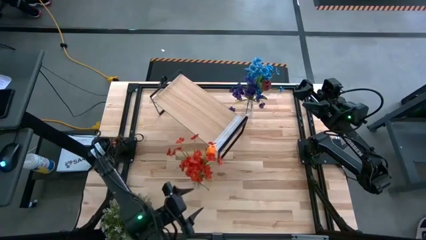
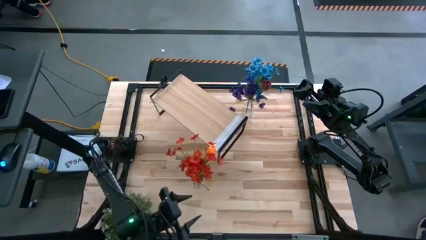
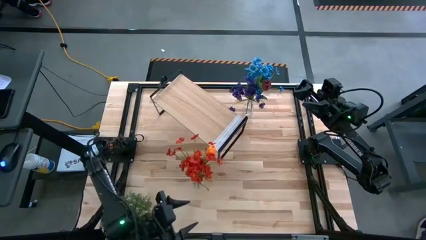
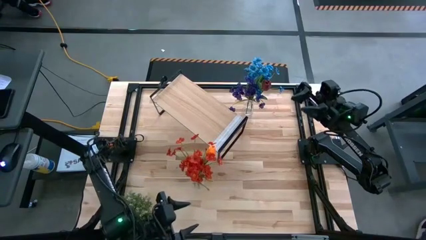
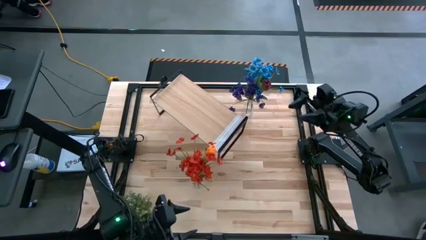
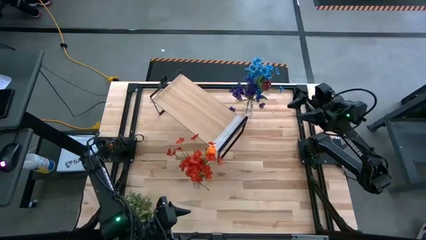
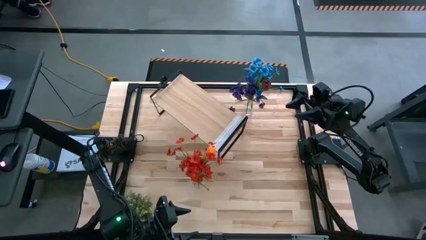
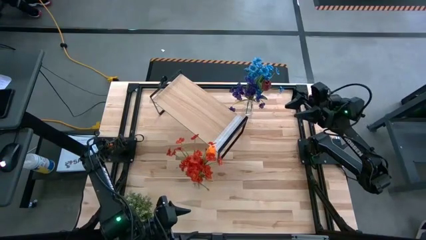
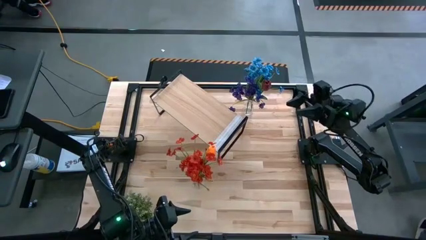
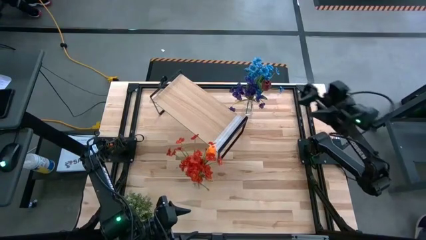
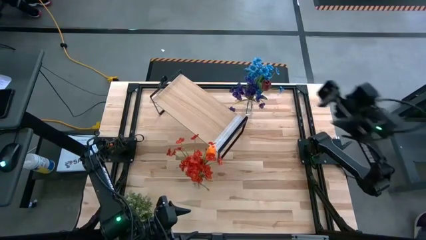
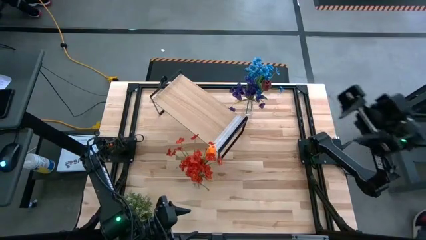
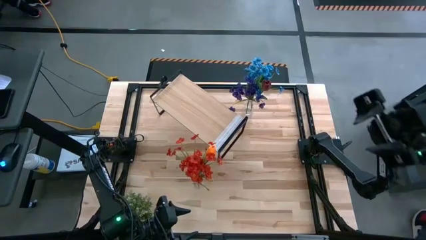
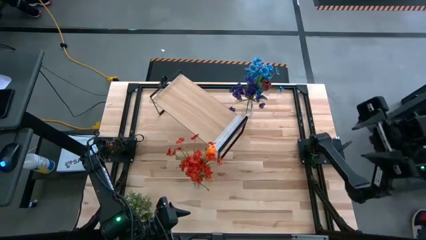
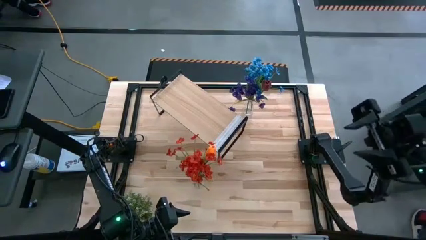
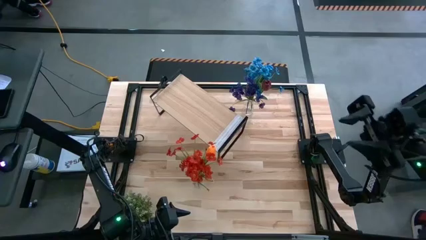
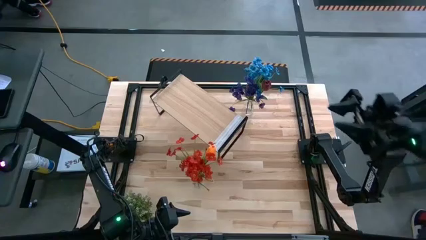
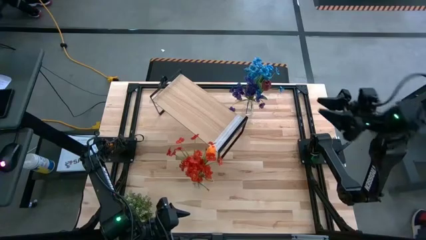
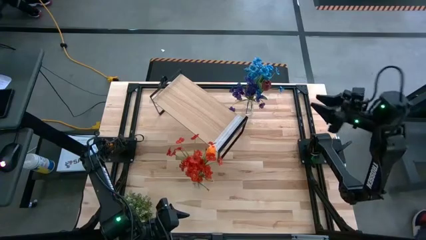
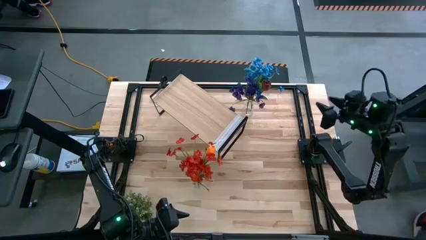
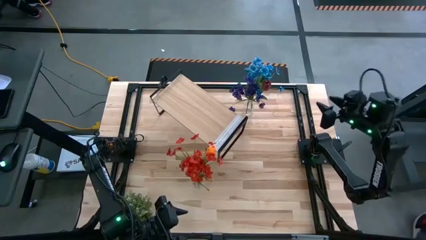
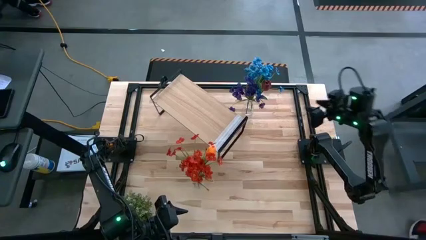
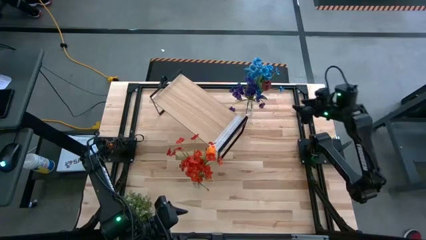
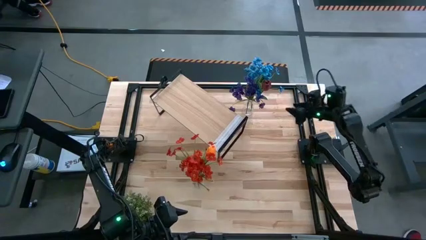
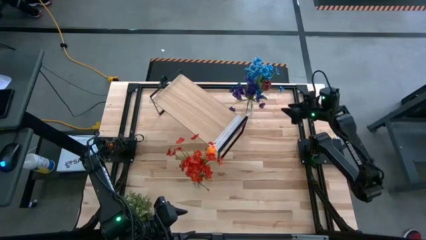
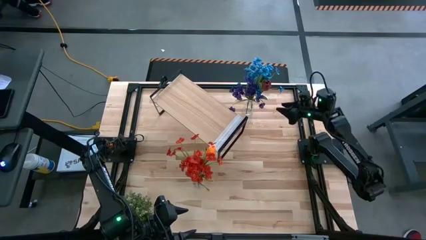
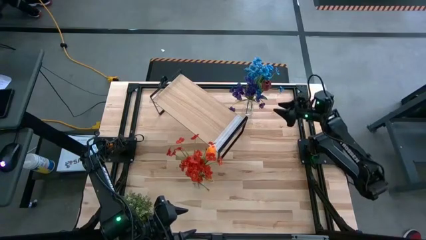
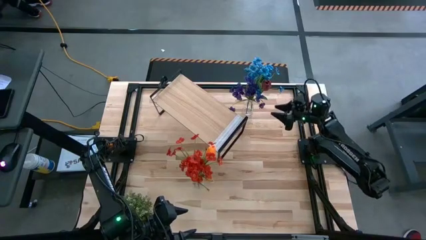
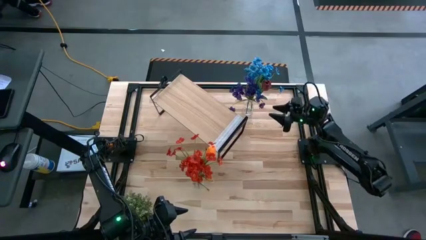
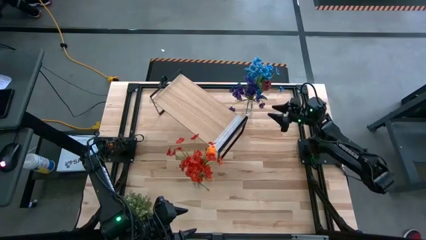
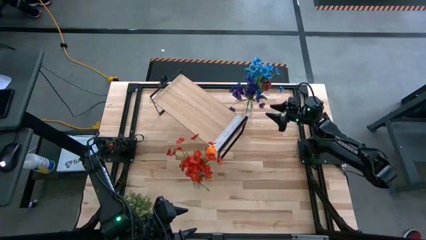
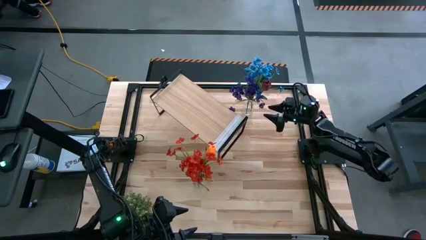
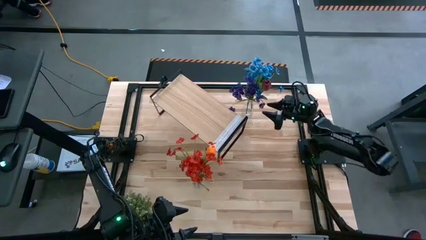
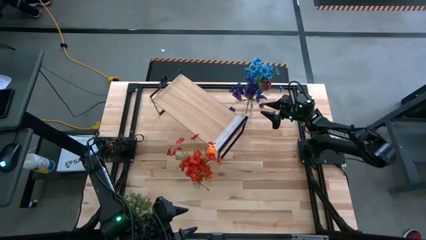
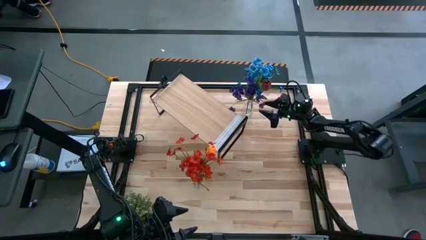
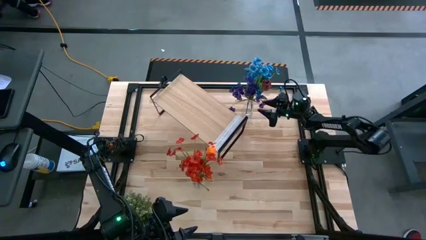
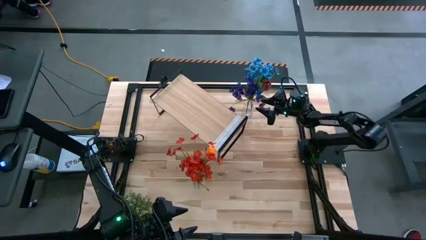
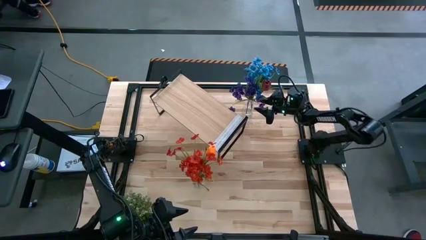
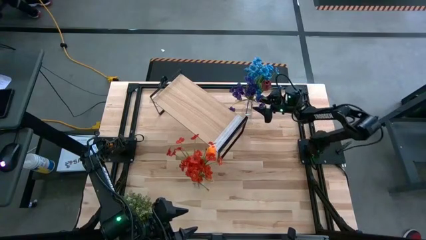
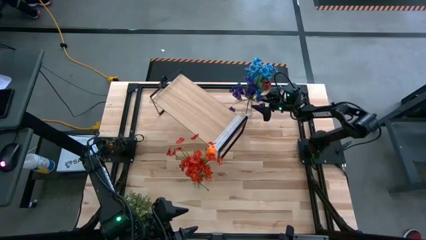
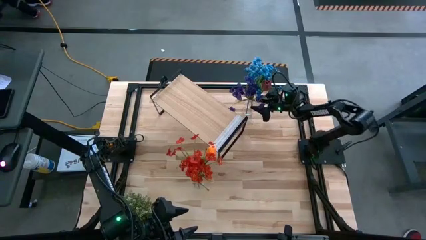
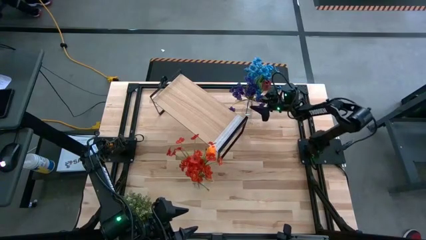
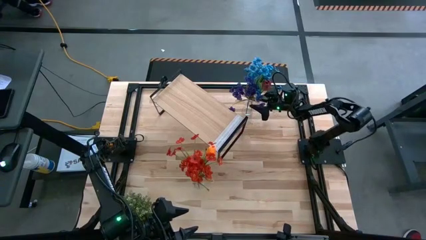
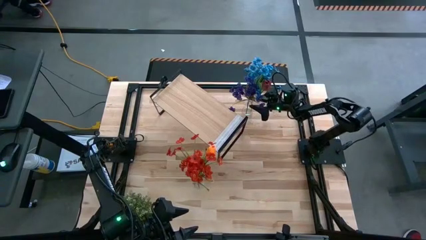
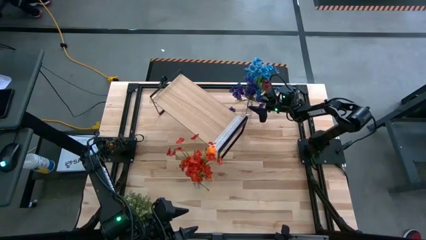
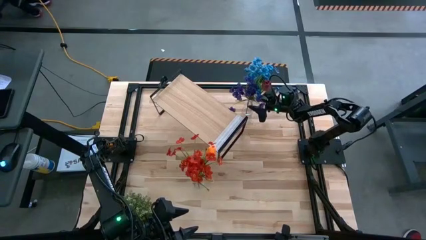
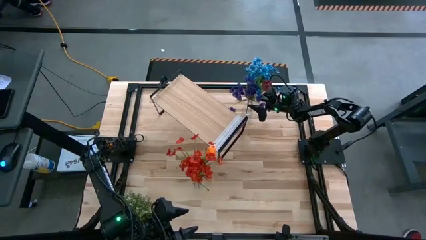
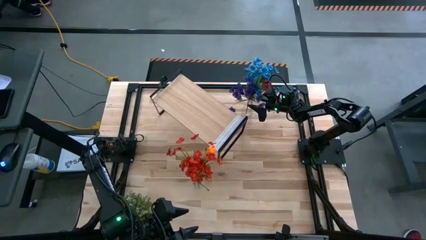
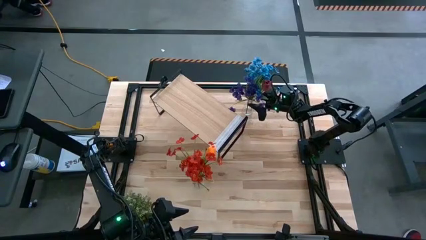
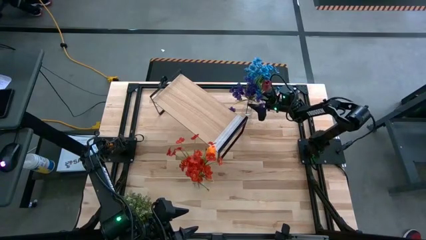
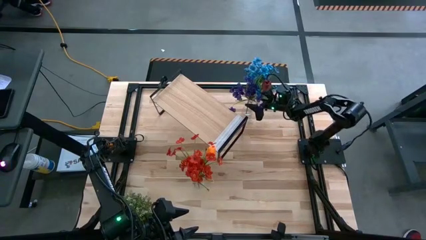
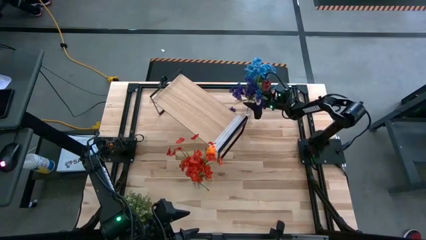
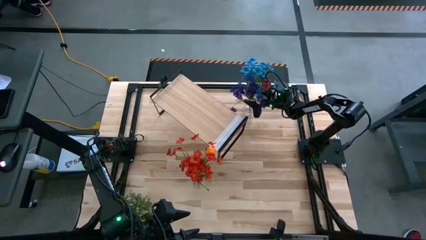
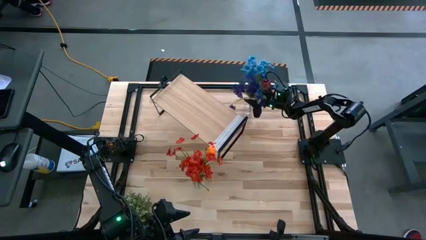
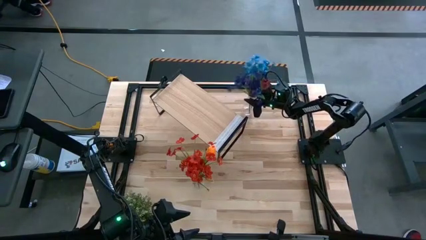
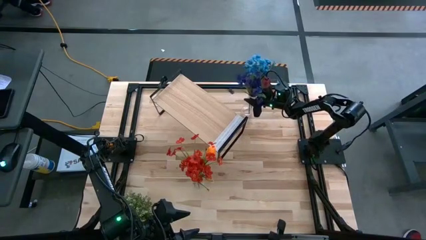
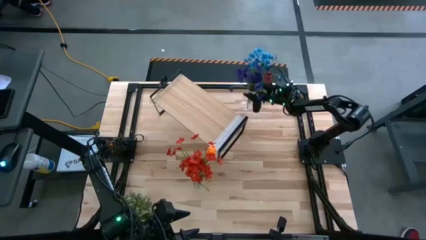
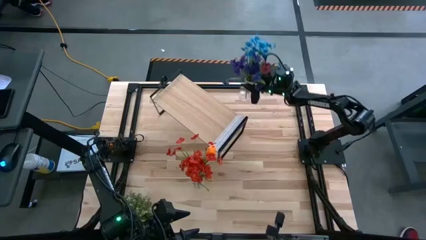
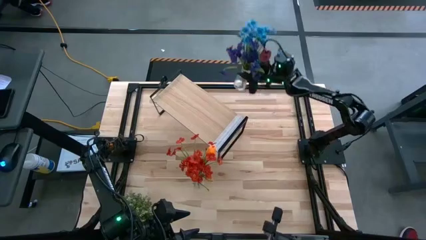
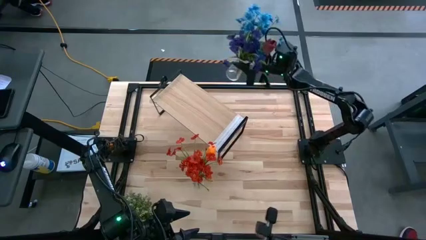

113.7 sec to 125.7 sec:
Task: Pick and place flowers into a vace then onto a shelf
Put the top transparent flower vase on the shelf
